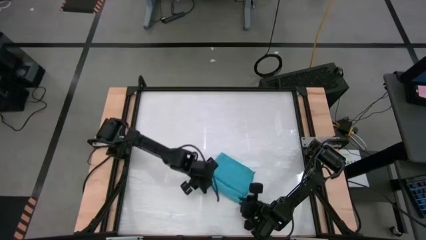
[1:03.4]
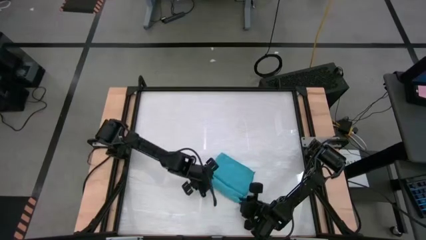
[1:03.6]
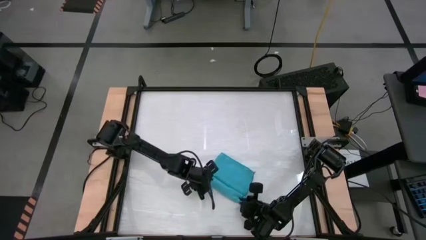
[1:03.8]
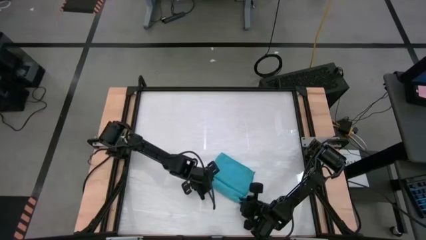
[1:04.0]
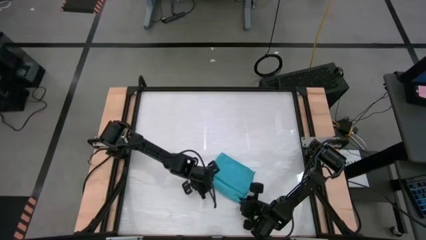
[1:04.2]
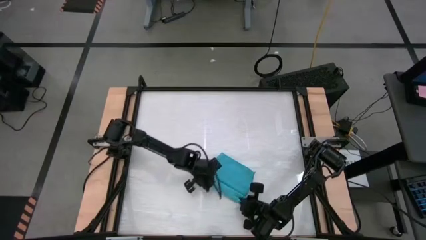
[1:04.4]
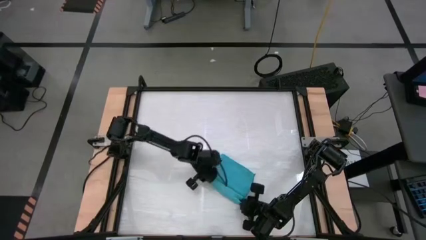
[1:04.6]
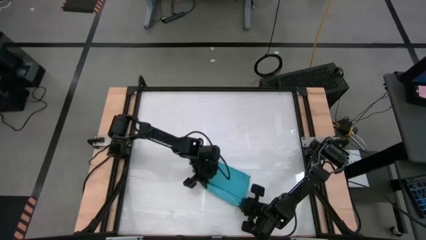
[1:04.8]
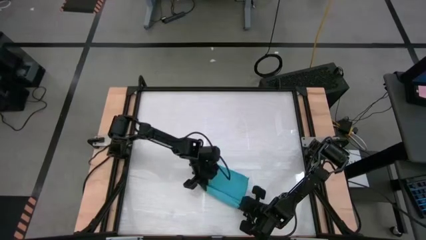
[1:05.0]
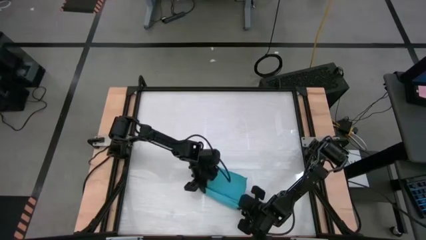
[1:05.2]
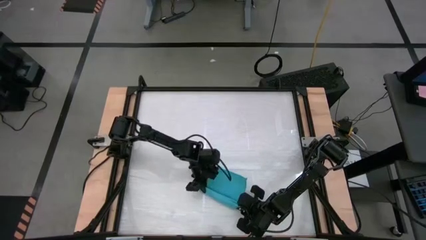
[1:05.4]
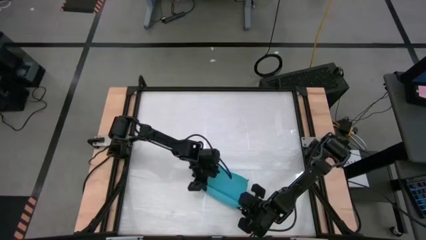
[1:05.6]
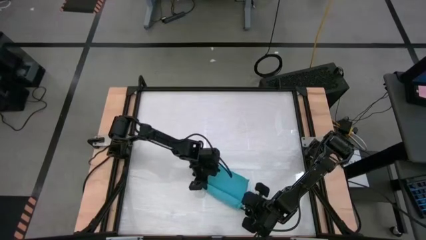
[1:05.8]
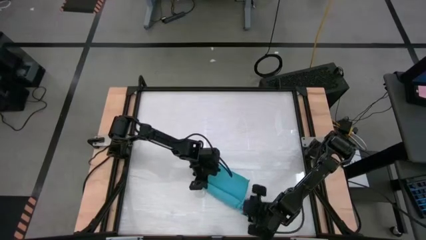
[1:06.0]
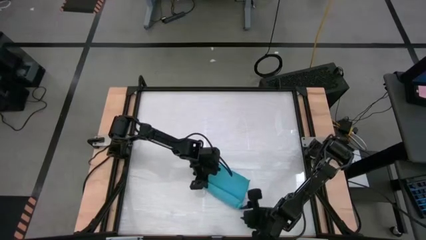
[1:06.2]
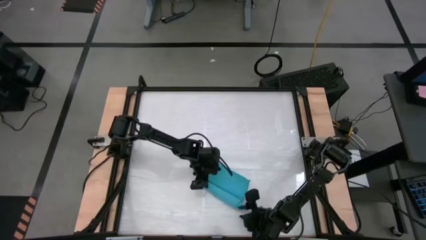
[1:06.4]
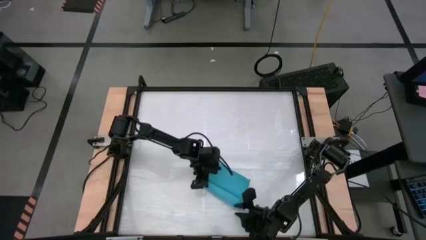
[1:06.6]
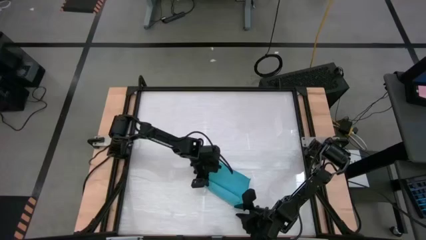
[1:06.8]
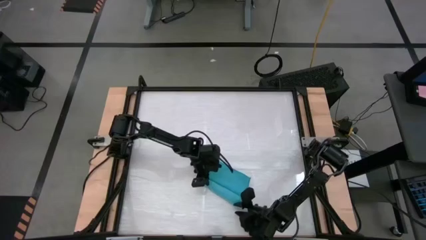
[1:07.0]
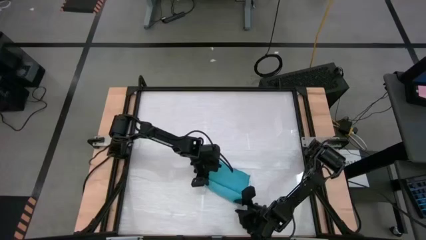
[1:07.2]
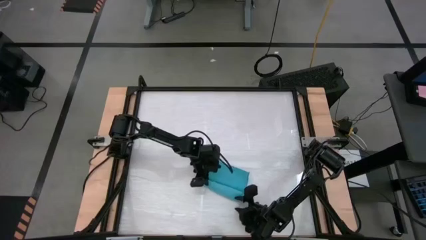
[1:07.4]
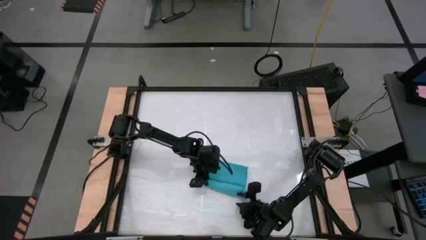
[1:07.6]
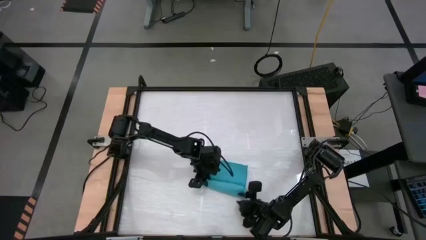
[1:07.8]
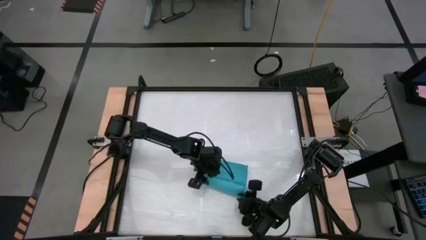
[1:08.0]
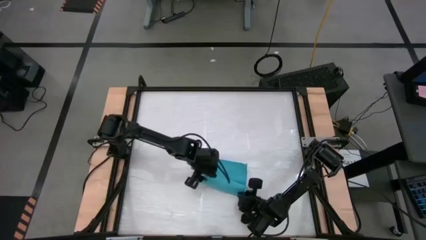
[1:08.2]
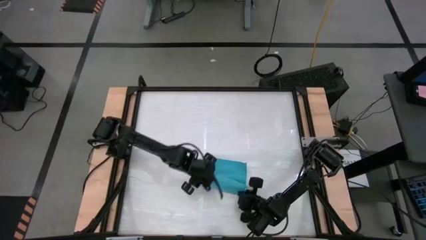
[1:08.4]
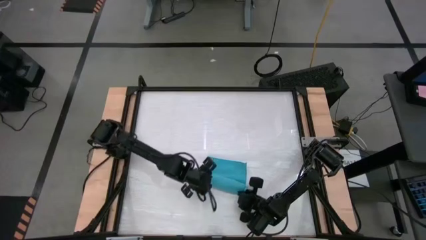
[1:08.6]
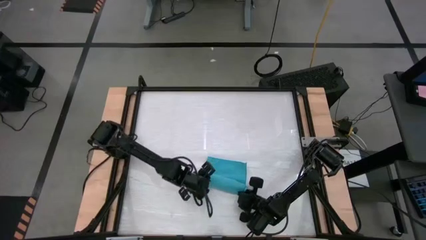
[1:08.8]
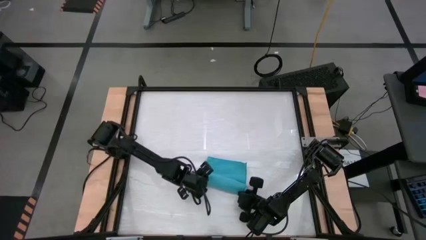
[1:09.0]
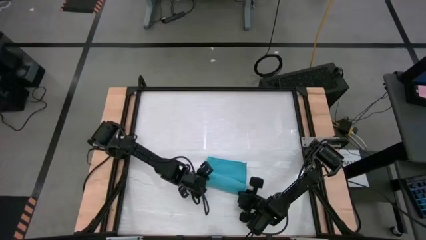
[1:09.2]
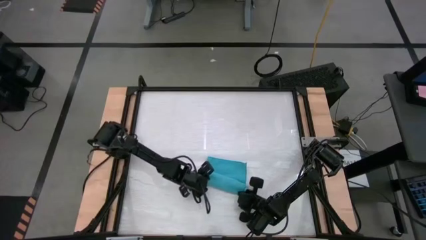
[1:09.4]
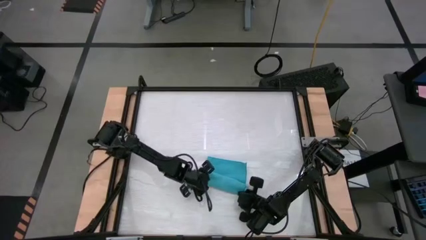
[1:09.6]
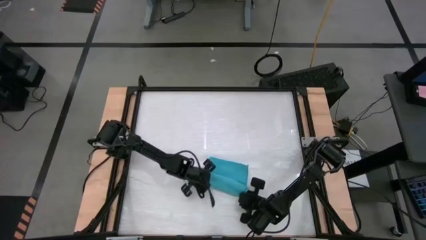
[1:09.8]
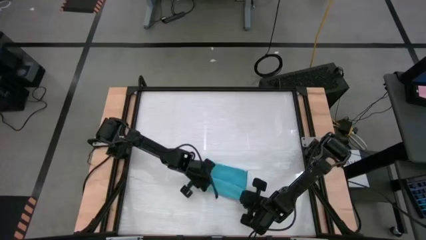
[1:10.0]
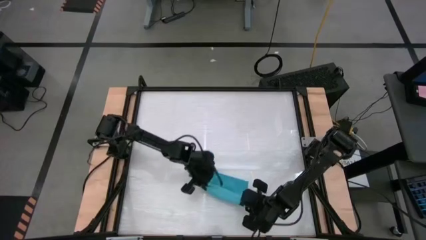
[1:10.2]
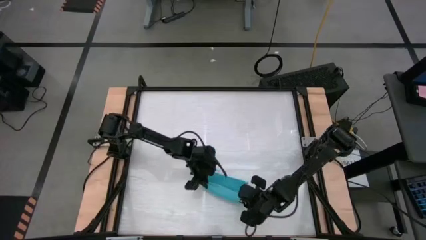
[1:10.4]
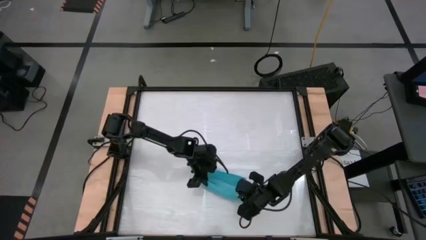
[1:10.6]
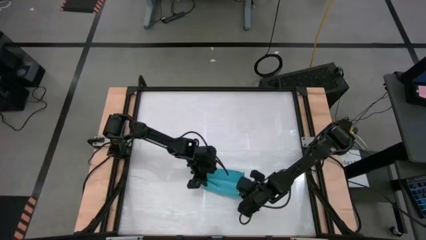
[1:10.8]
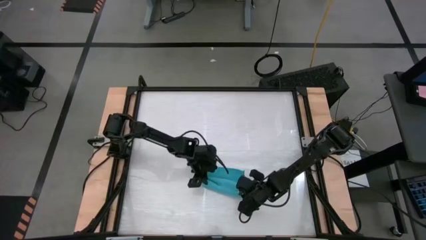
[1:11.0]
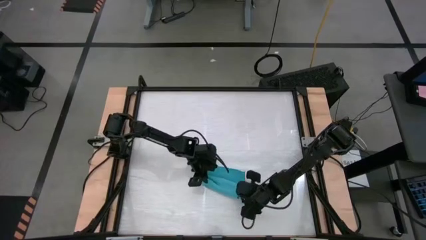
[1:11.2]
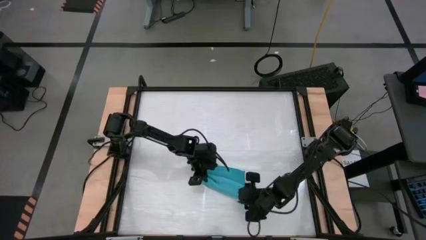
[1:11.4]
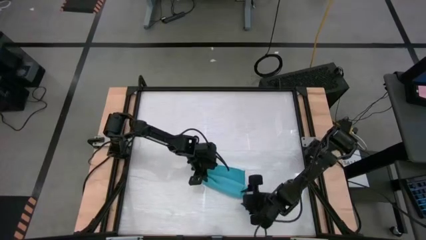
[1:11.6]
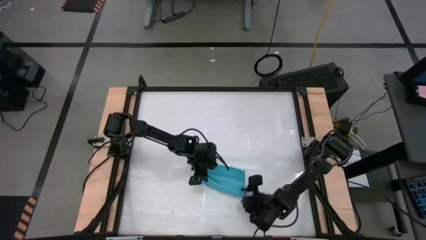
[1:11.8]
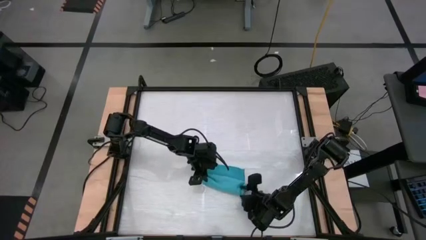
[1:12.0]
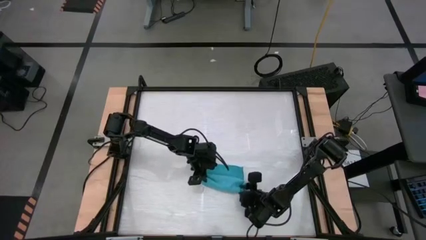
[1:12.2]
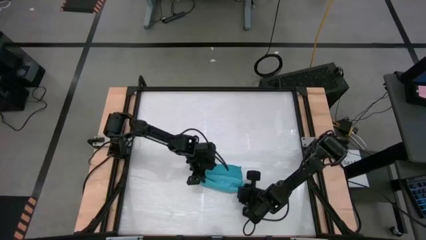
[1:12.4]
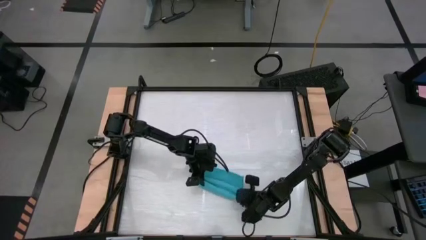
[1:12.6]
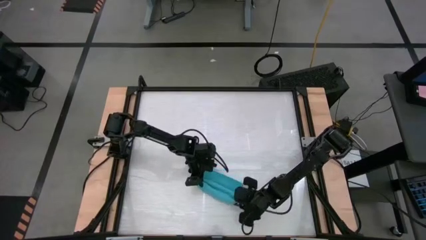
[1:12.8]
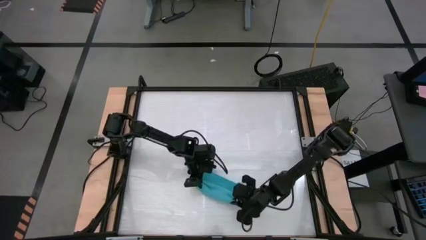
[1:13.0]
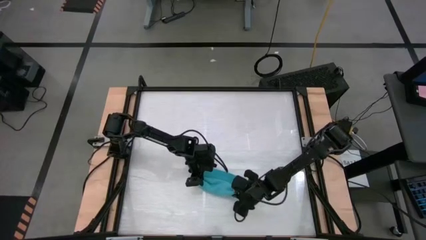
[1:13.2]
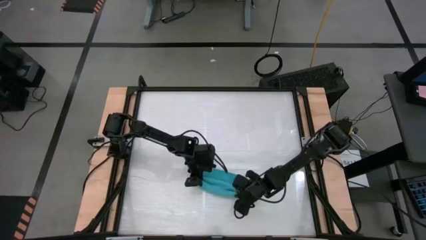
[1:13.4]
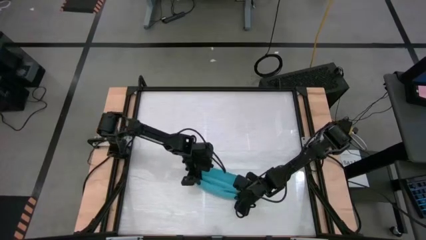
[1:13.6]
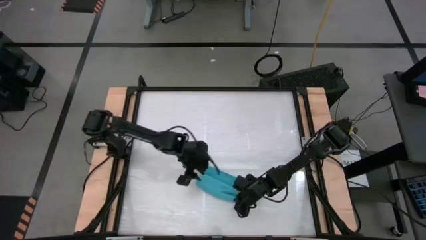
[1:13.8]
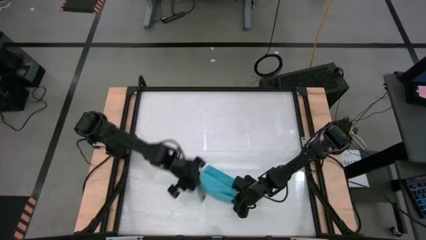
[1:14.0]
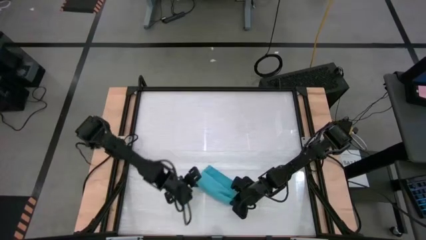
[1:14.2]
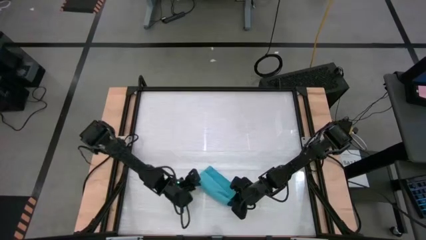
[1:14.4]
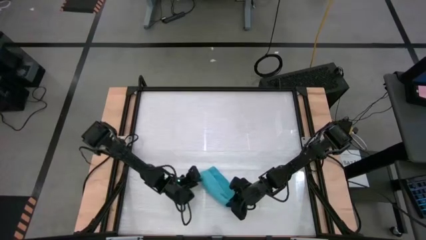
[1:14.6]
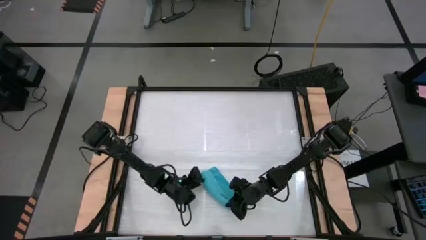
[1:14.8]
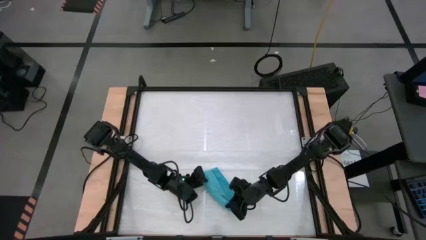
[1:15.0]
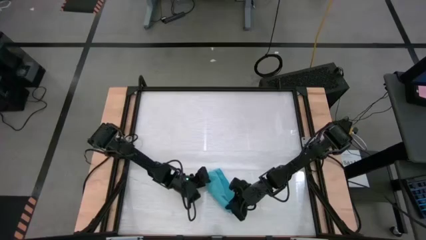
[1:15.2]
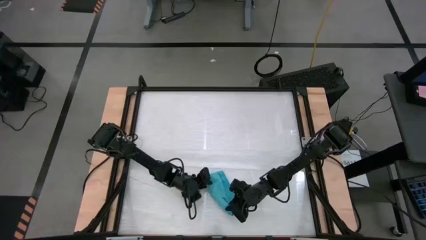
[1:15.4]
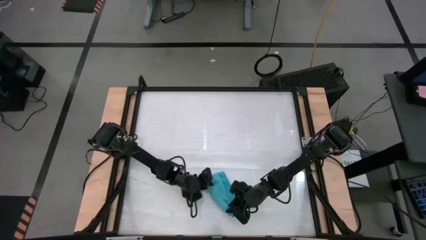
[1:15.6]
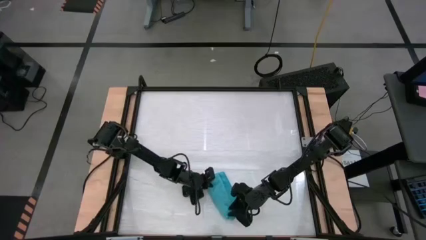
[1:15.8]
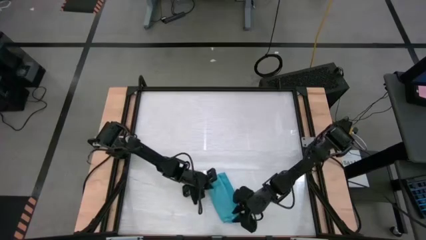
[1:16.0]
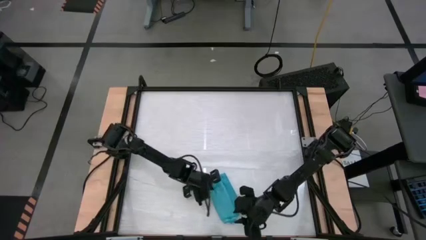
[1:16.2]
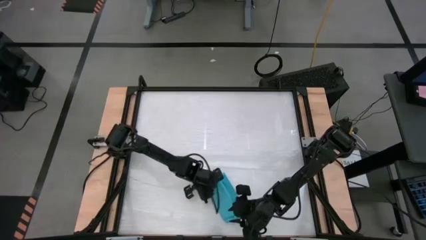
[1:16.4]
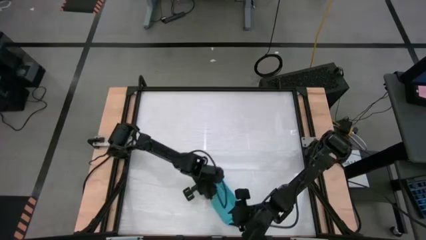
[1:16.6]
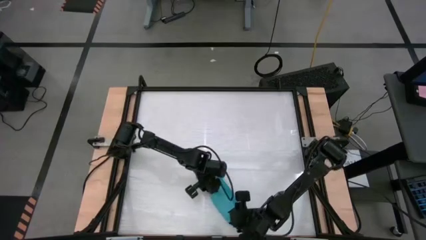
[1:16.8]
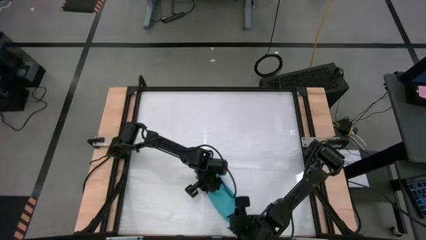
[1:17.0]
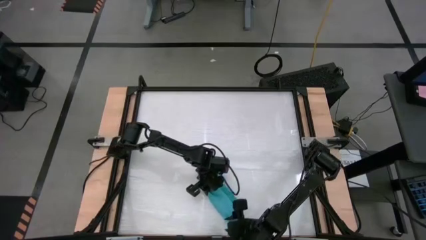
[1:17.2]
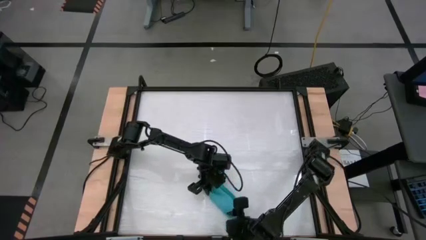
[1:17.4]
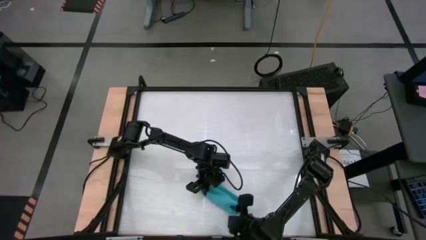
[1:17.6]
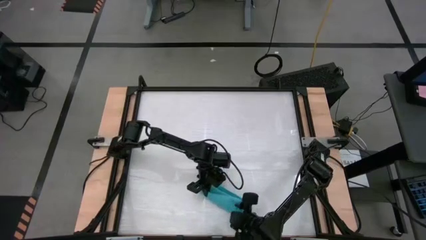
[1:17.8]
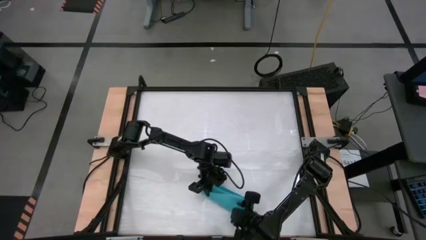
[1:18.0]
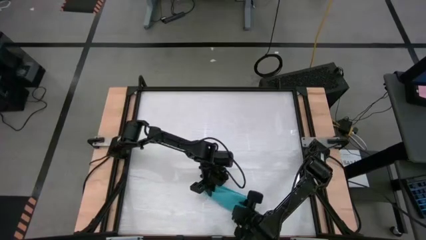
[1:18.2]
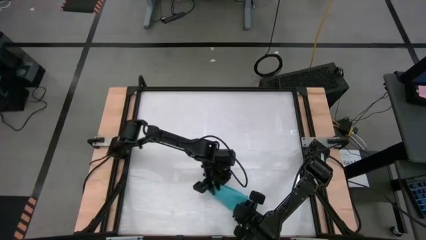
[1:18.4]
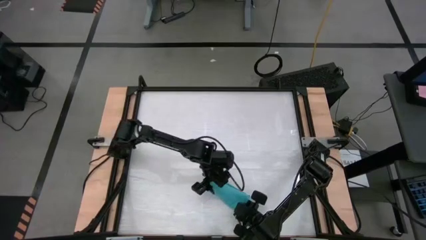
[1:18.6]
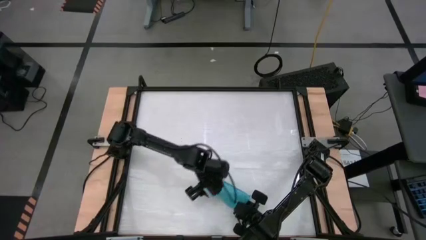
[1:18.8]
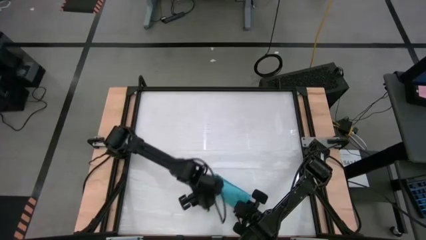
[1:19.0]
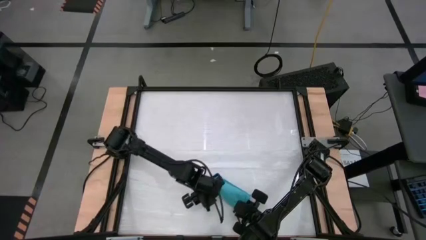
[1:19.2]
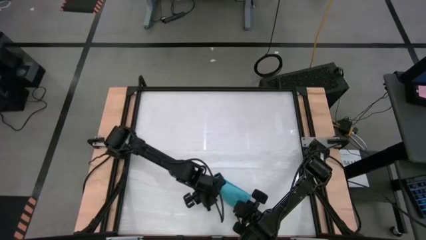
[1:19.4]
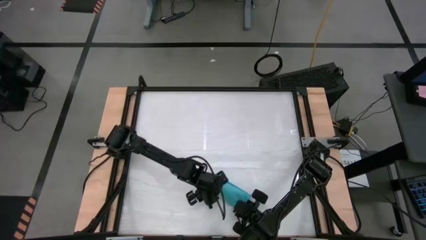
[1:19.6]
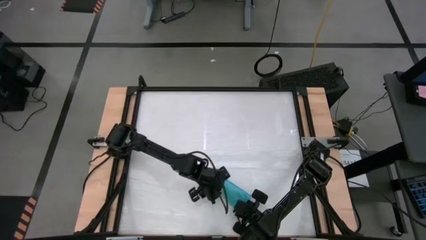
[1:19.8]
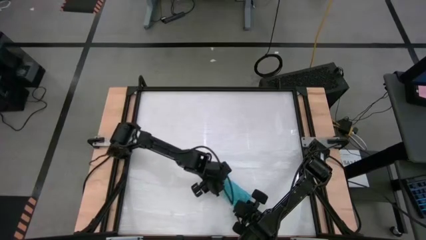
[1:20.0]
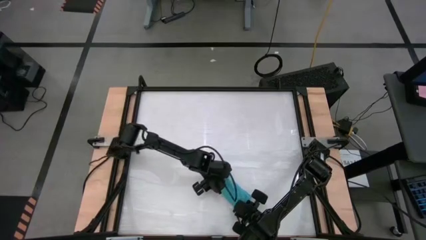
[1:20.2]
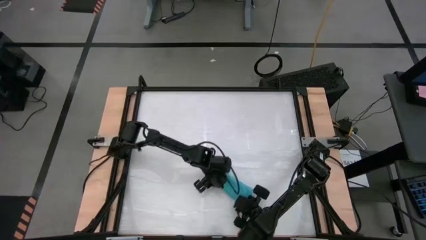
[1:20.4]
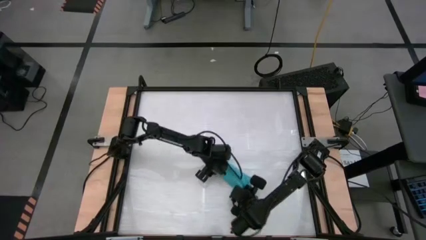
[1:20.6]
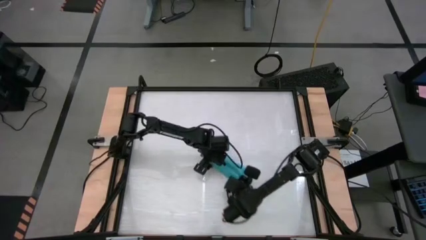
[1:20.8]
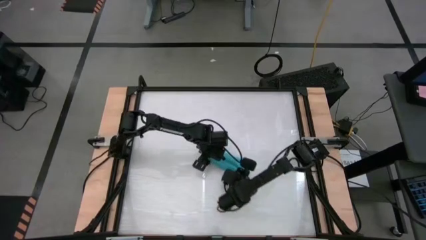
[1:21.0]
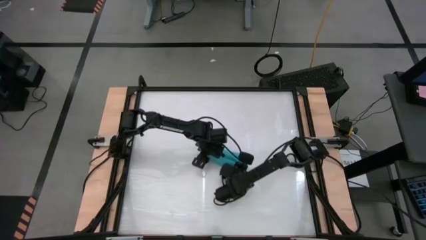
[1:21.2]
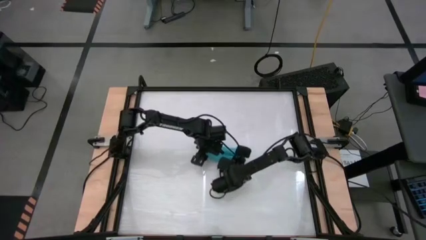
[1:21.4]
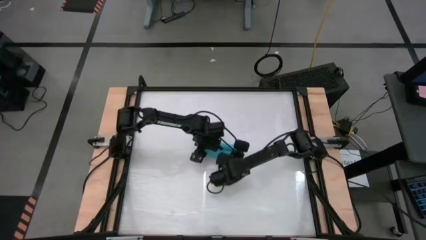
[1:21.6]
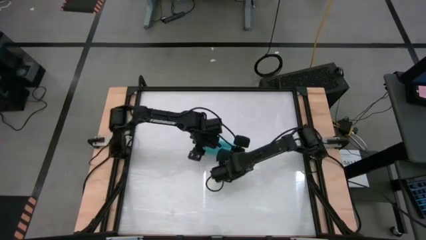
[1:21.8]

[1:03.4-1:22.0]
Task: Roll towel
Roll the blue towel
